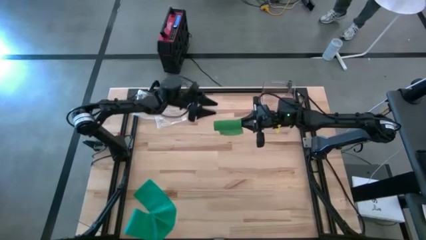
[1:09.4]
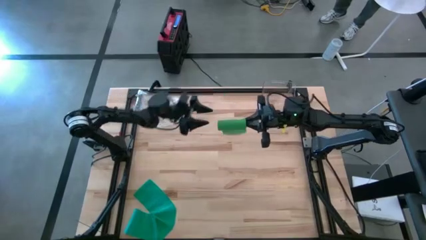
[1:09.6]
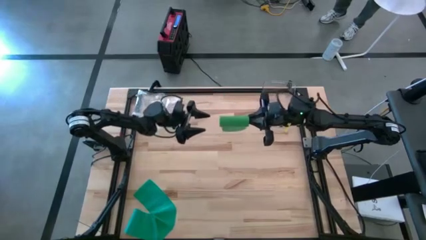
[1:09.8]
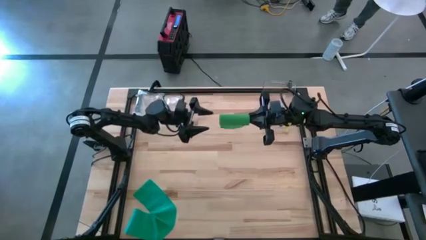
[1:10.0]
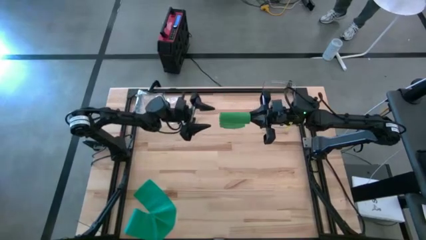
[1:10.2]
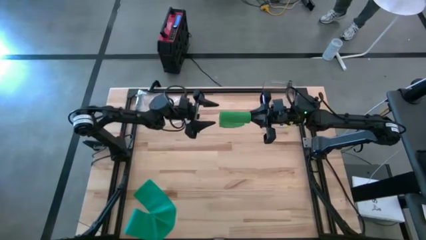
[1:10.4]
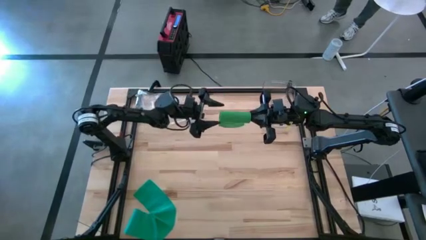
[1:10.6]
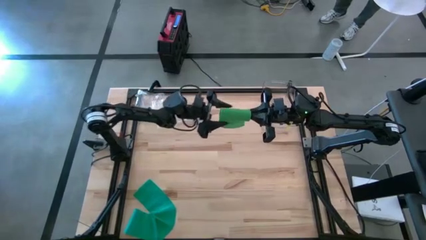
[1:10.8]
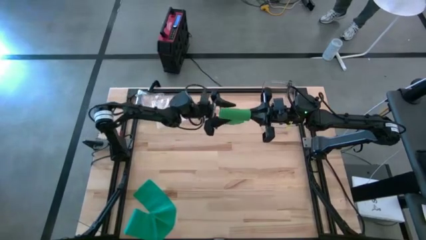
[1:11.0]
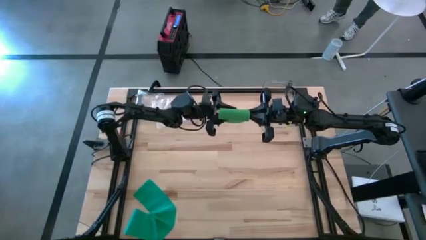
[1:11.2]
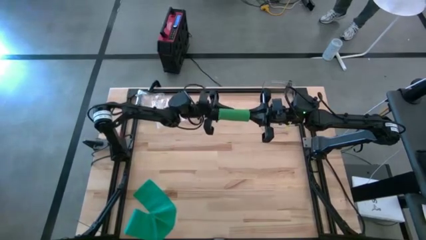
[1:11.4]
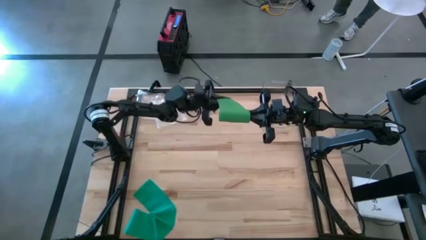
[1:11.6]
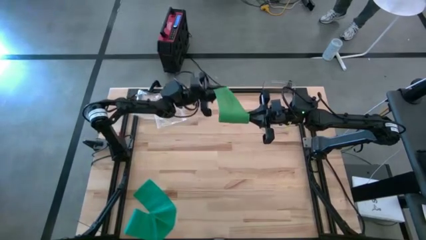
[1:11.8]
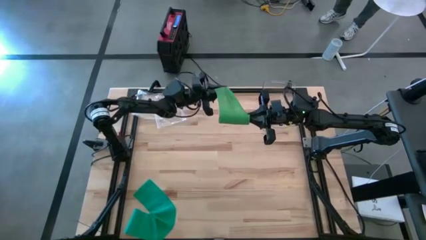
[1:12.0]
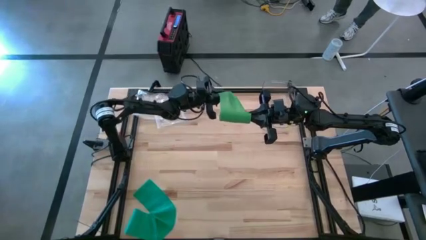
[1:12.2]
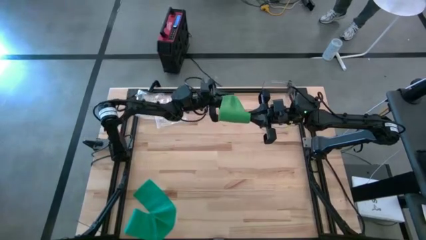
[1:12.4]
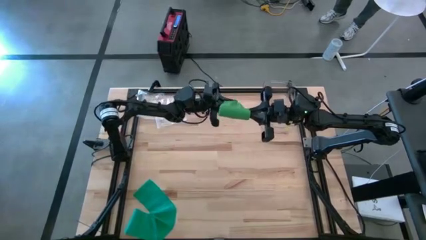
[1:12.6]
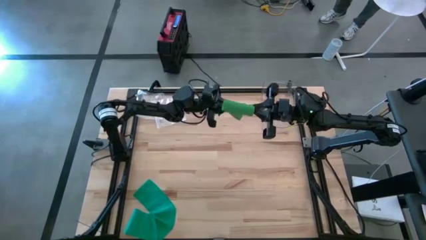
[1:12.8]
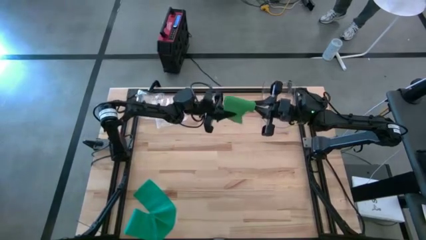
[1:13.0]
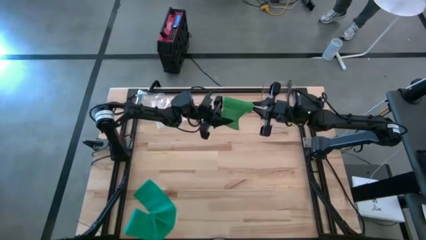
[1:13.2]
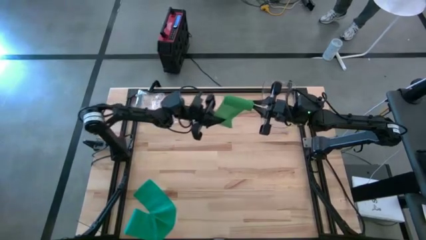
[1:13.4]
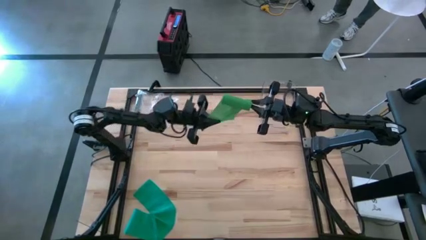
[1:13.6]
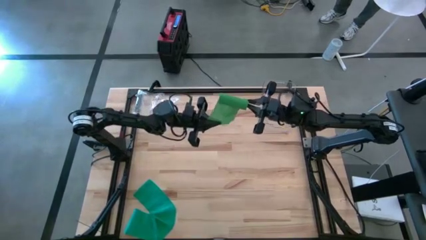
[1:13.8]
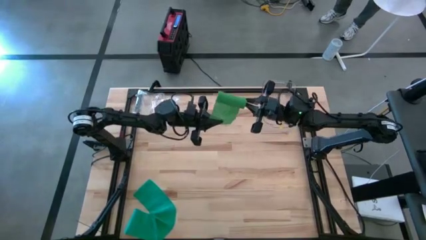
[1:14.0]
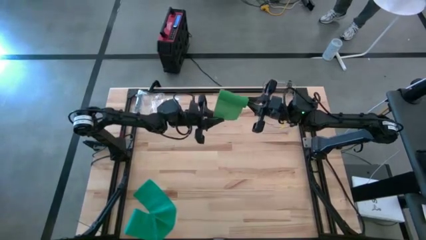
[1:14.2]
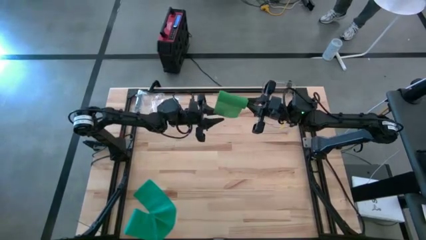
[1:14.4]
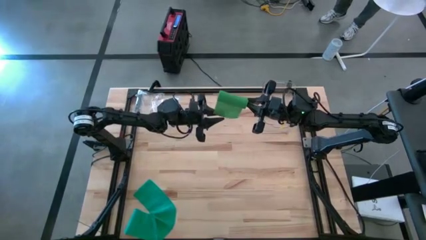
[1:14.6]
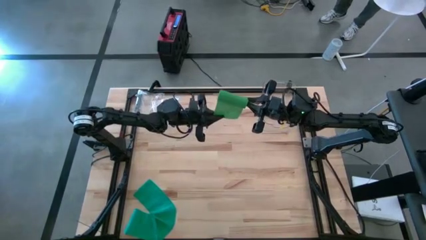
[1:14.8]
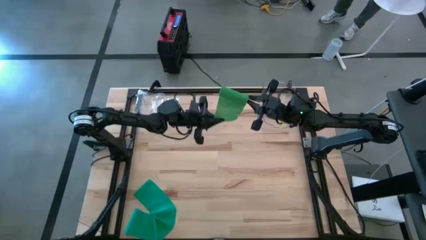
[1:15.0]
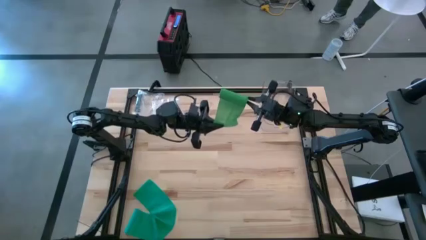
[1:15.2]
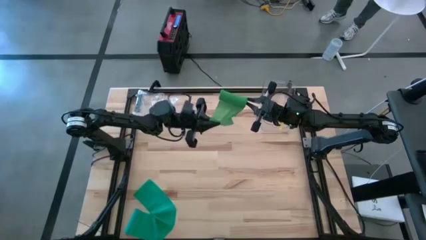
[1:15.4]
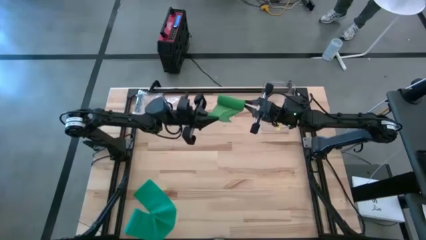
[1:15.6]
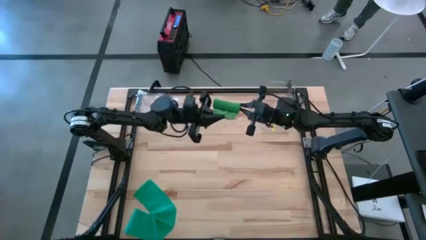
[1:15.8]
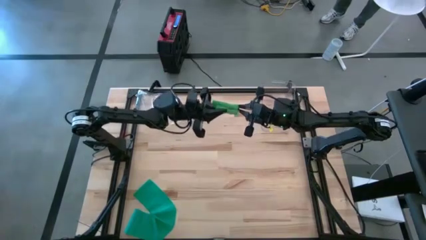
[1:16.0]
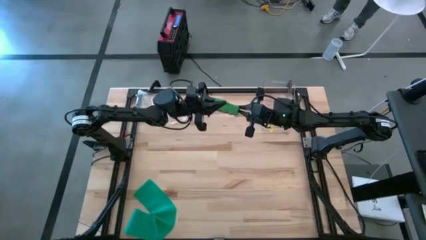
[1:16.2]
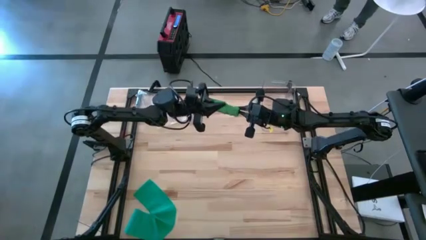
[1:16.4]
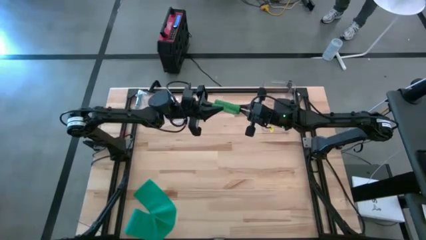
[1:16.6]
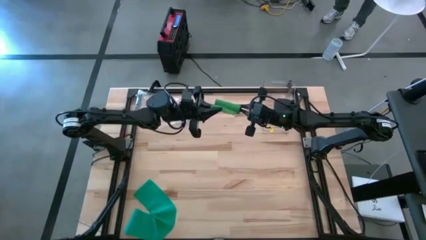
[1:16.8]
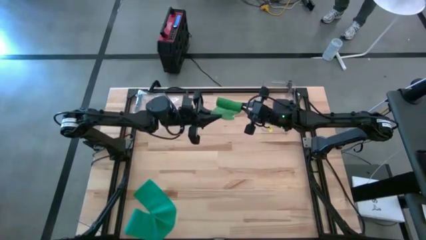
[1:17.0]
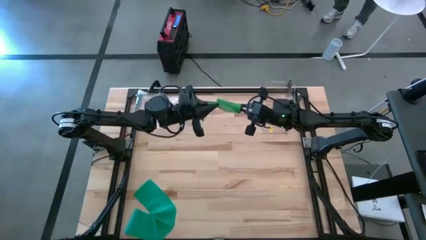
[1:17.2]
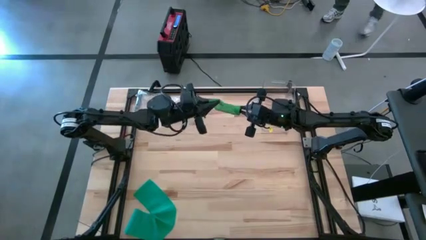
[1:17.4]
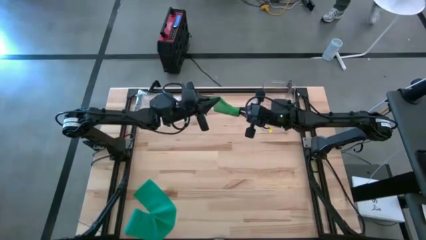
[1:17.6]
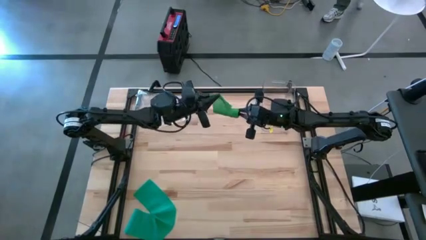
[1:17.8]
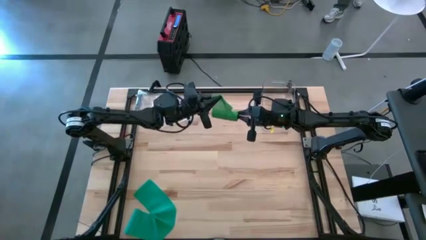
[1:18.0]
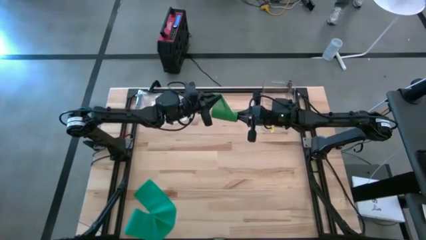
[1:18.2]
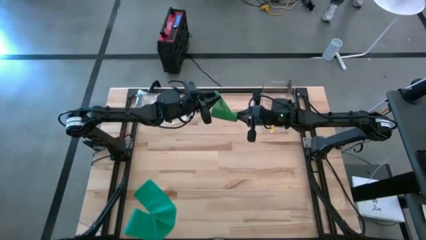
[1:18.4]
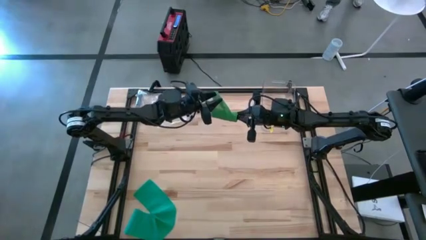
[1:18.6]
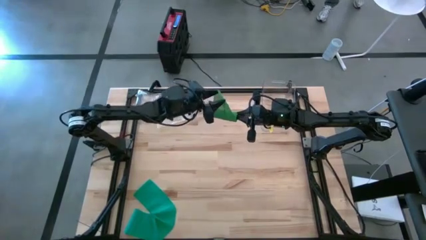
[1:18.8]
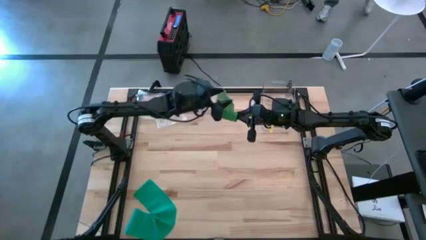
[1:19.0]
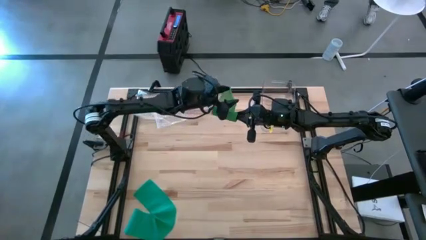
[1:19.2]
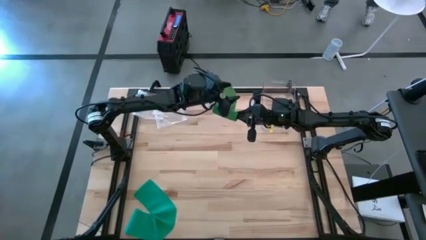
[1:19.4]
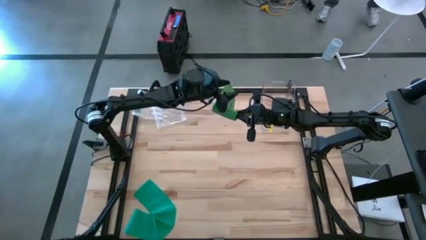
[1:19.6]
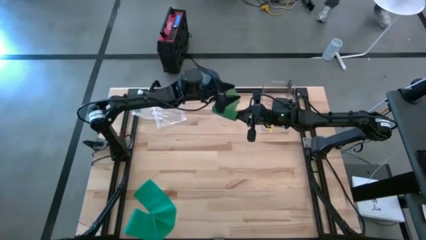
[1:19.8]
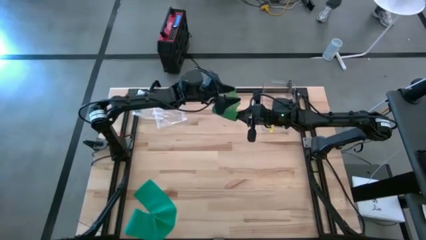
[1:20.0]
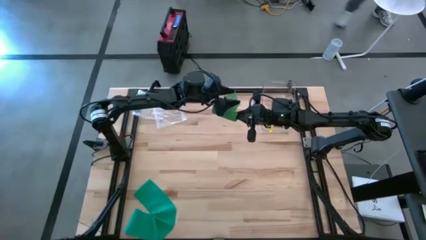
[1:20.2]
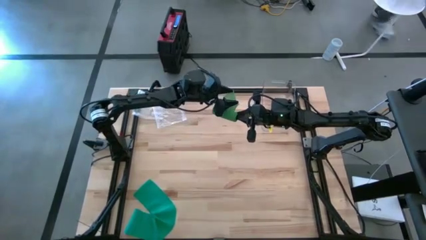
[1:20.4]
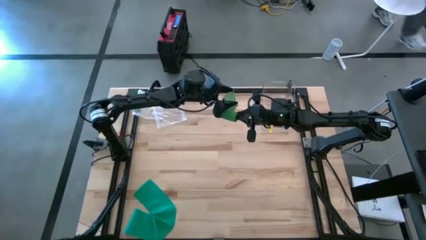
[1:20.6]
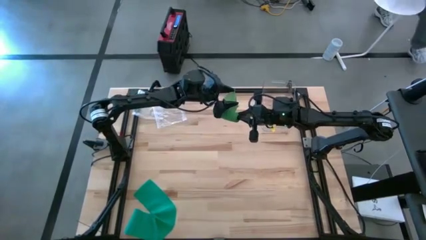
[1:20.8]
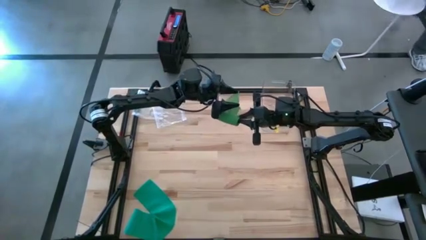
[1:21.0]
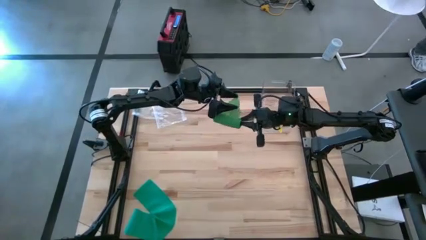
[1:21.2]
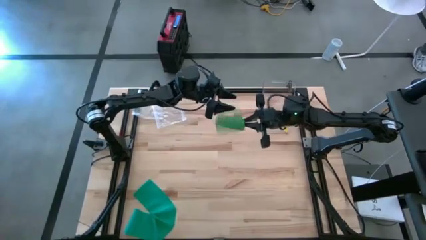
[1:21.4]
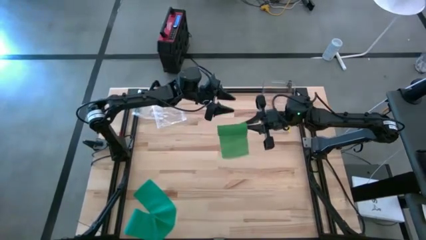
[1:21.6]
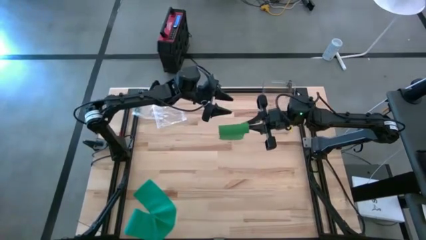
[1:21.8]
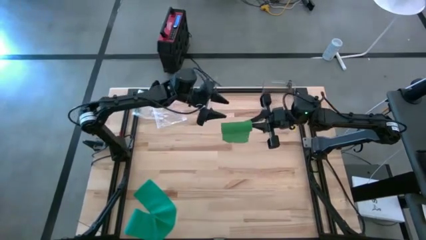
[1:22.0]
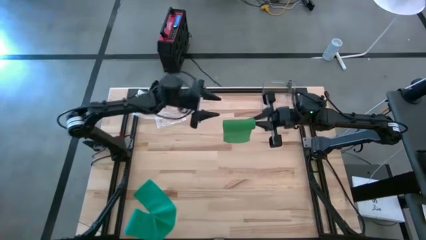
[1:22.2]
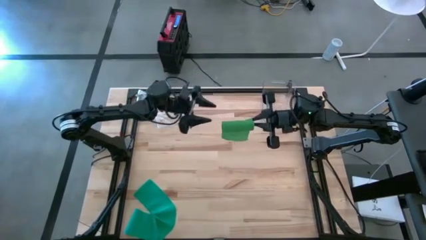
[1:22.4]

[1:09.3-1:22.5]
Task: Roll bandage
Roll the green bandage

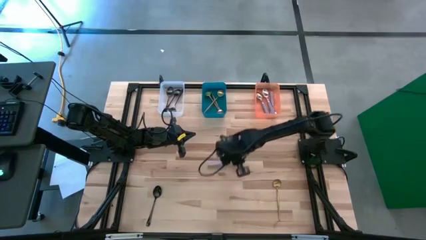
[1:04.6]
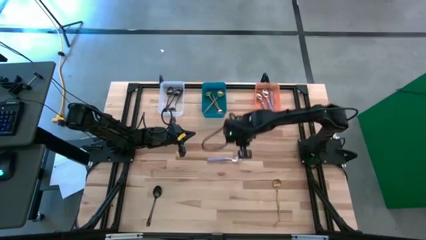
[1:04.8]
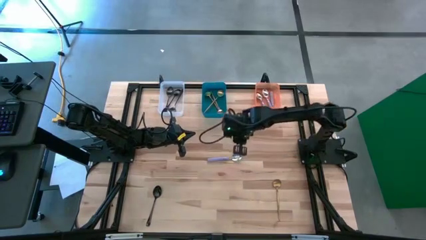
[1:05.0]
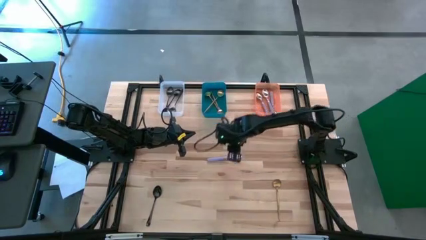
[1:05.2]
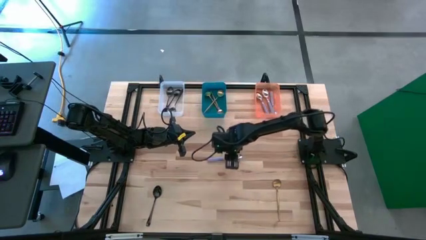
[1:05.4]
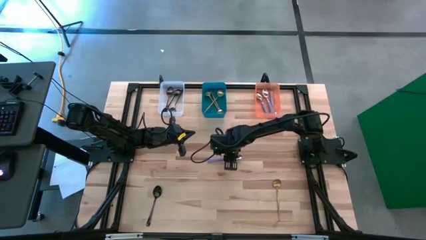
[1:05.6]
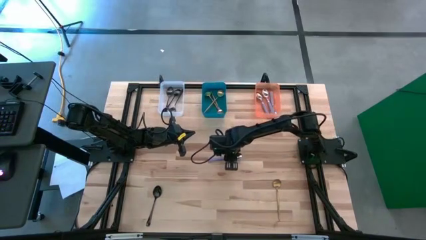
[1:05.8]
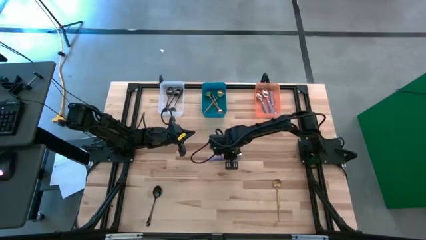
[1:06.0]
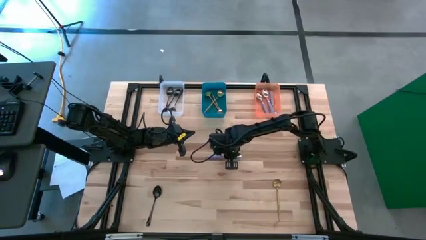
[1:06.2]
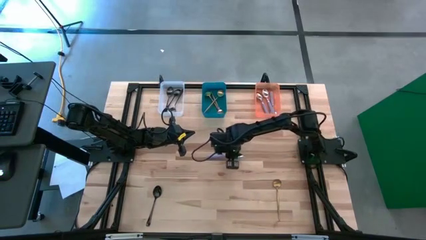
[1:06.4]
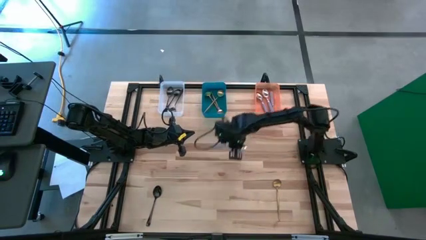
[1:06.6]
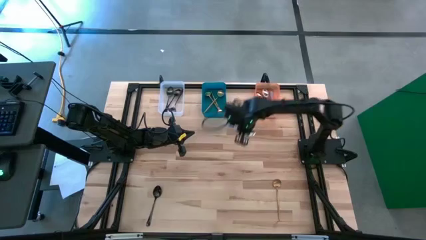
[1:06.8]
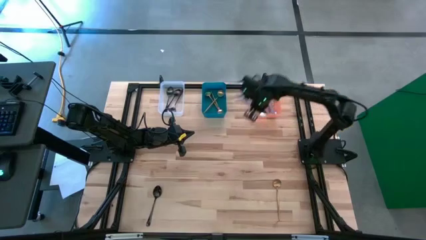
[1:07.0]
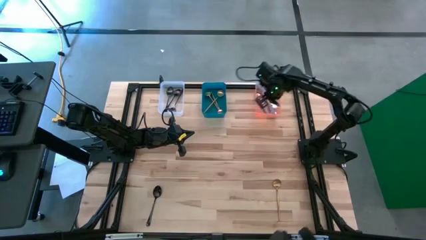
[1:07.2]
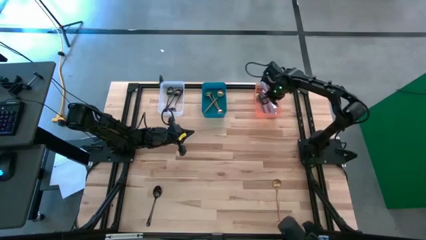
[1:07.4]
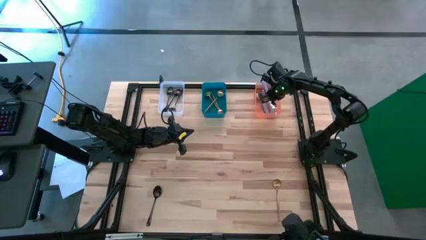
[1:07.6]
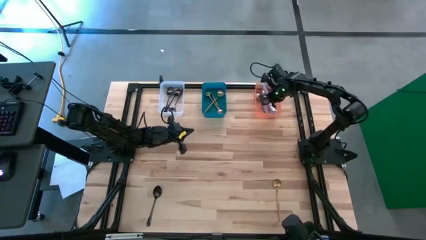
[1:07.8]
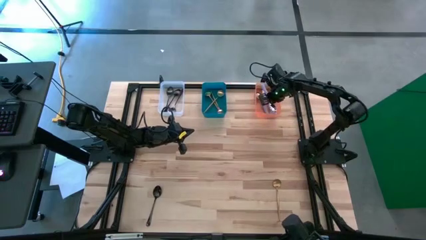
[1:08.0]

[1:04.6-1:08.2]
Task: Sort silverware by color (type)
Put the purple spoon into the orange bin
